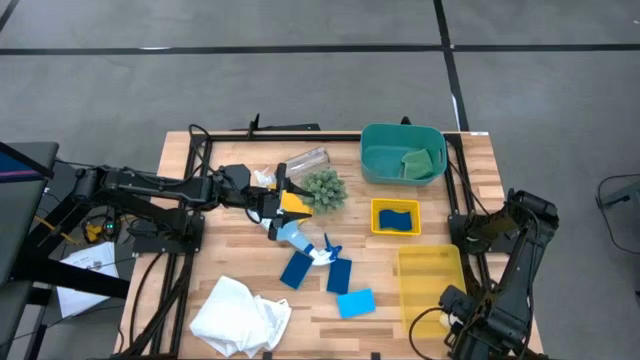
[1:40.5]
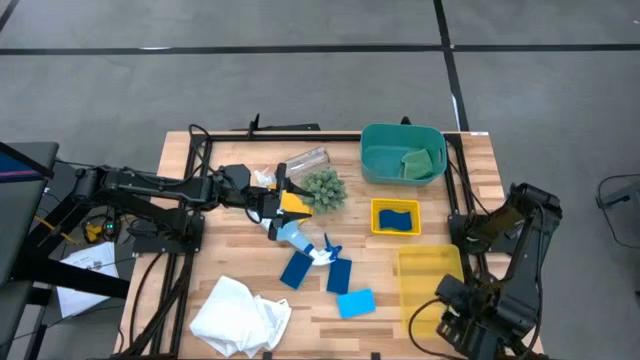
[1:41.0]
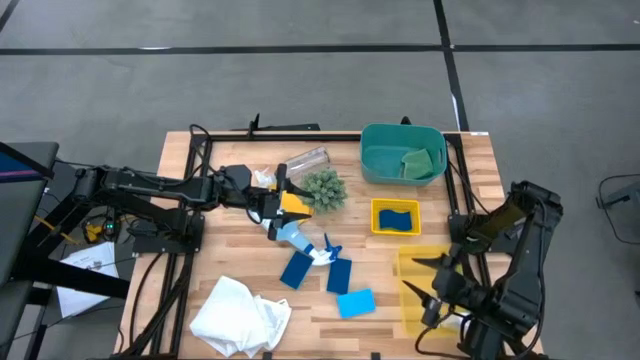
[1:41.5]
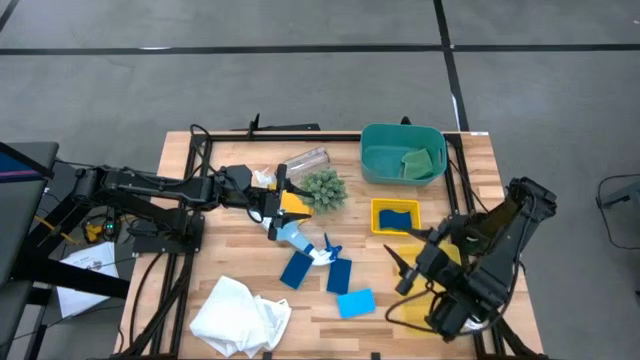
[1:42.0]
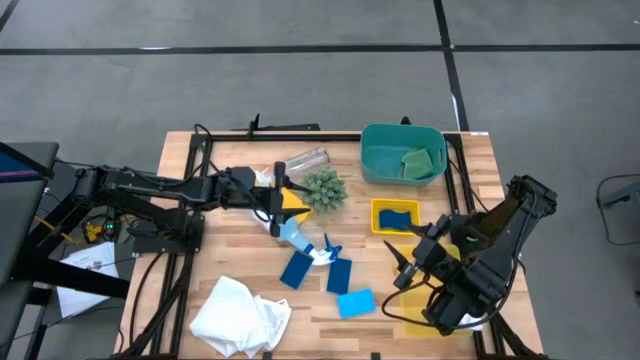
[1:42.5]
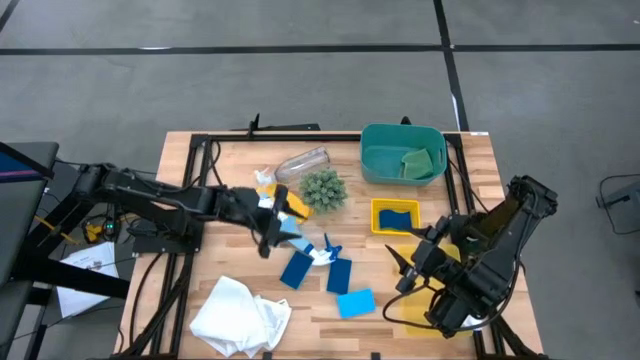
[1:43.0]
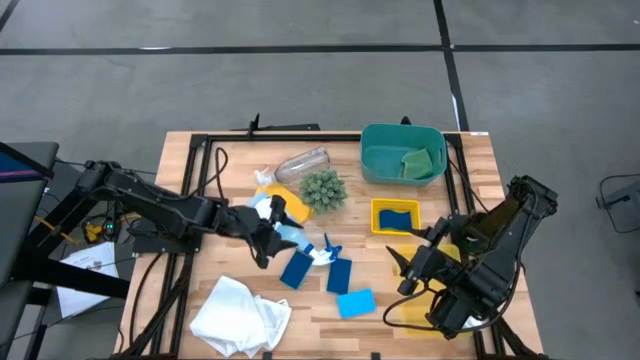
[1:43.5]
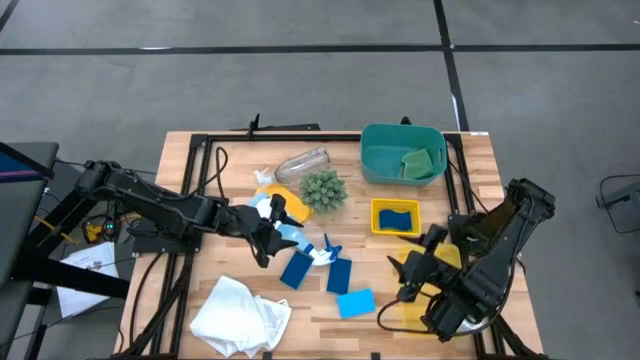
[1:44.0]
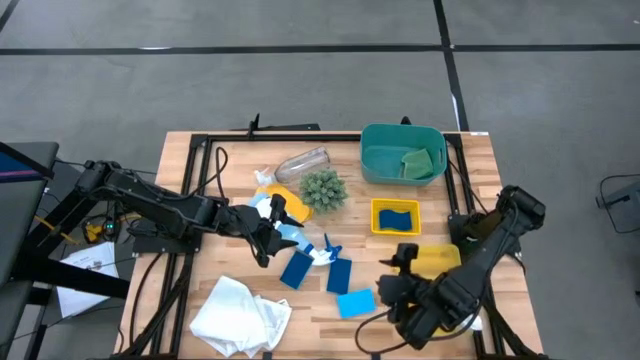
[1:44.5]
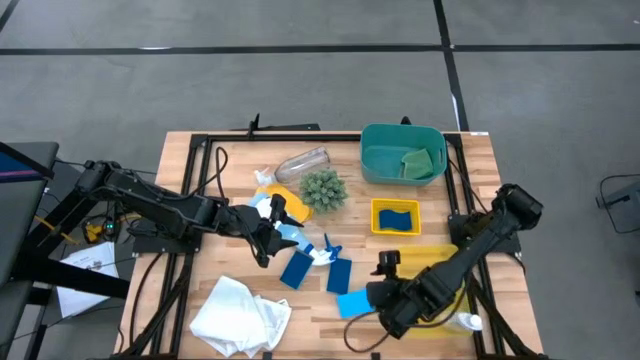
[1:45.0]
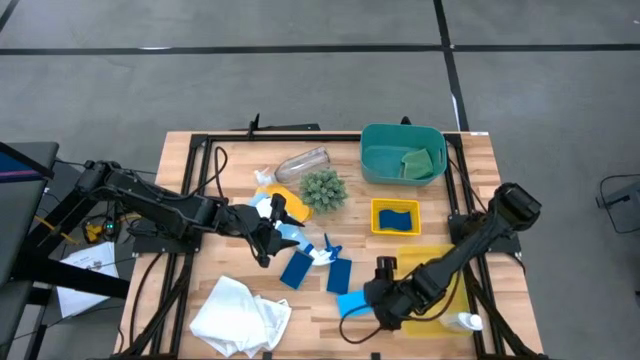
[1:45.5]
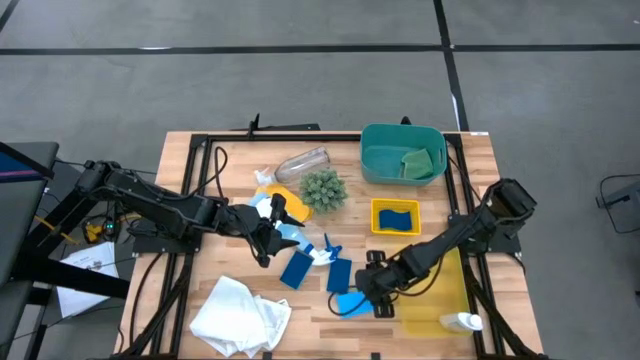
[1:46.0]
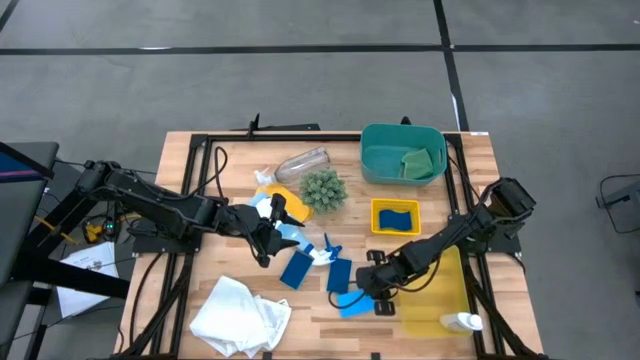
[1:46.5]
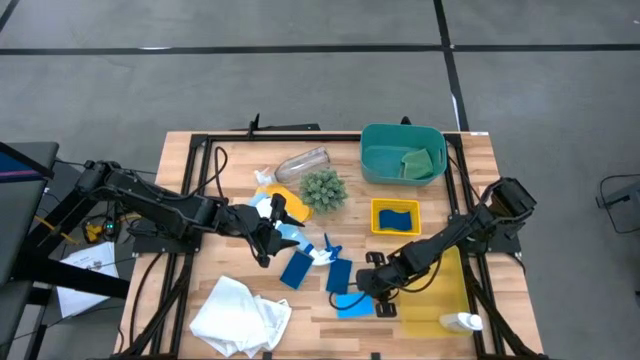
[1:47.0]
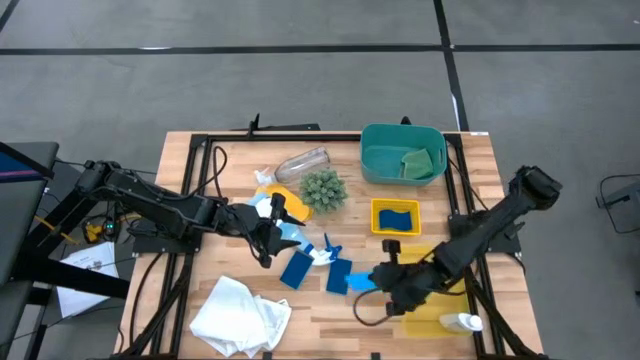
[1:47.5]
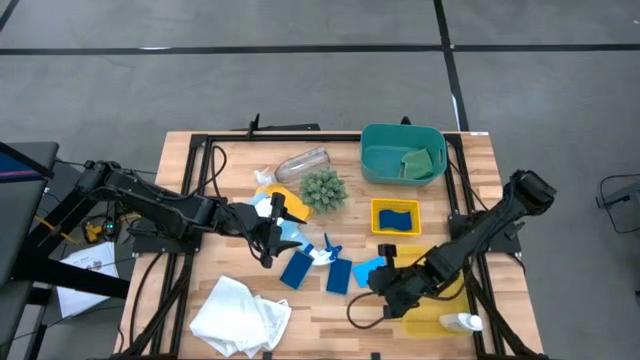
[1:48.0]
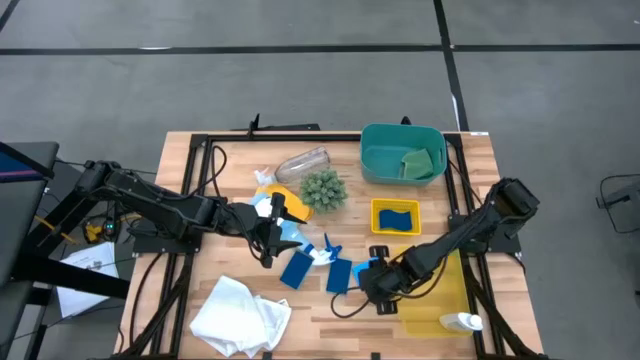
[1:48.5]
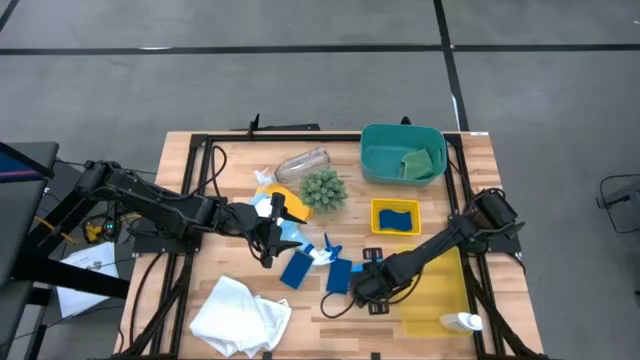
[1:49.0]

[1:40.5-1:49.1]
Task: Pick & Place Kitchen Items
Put the blue sponge into the top yellow bin

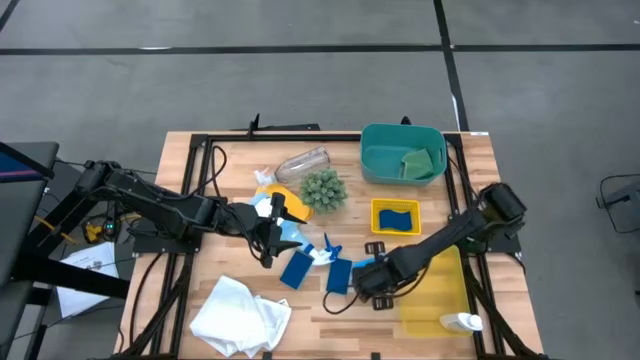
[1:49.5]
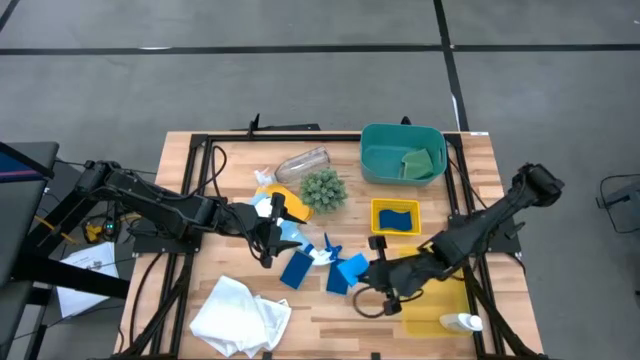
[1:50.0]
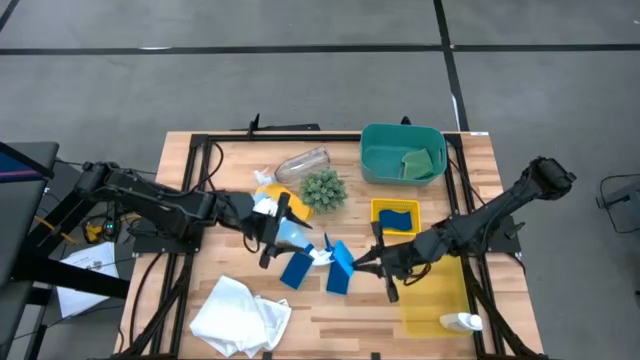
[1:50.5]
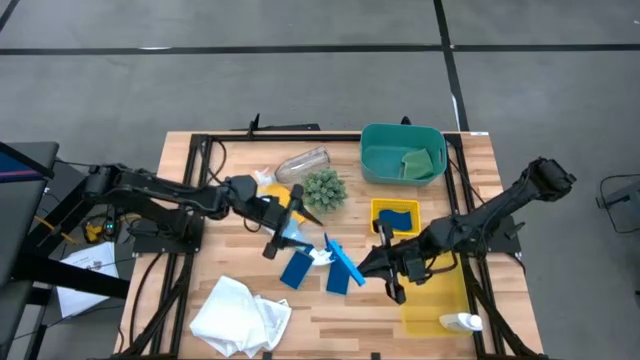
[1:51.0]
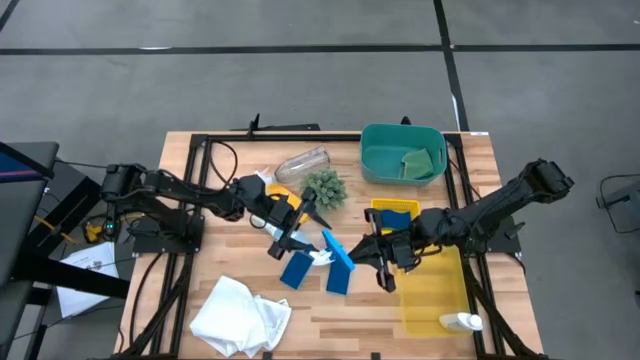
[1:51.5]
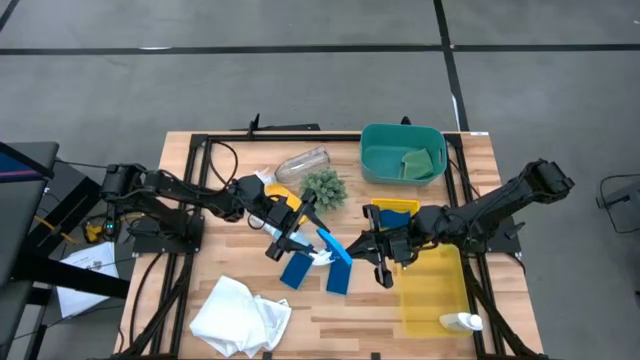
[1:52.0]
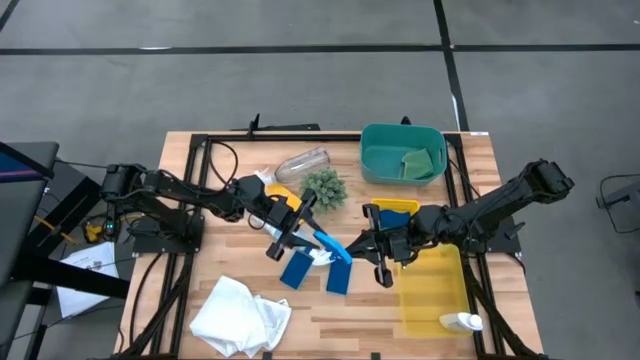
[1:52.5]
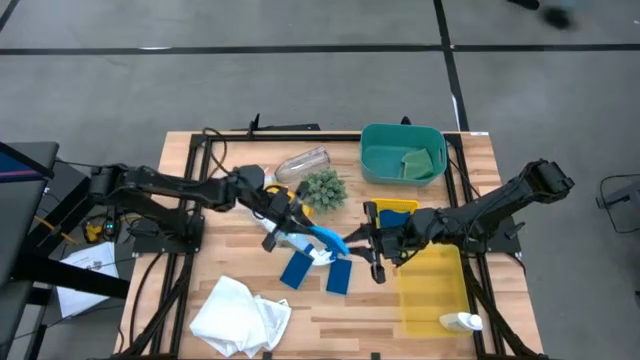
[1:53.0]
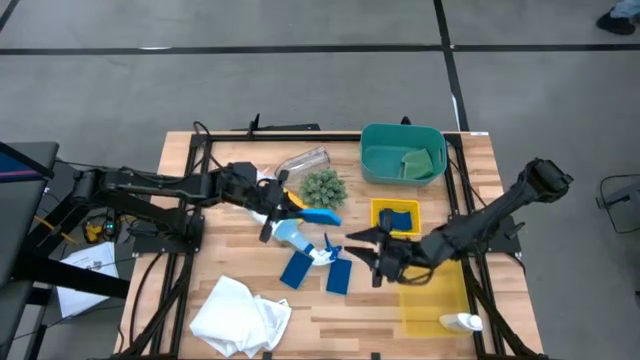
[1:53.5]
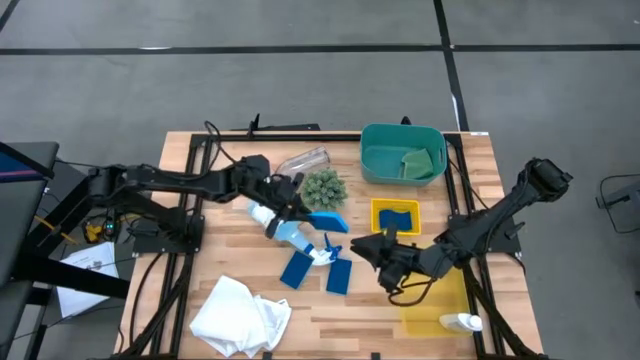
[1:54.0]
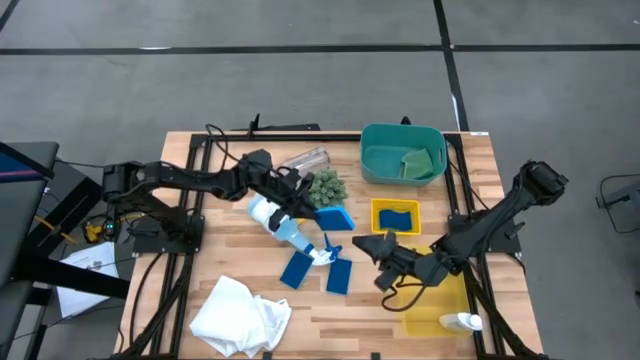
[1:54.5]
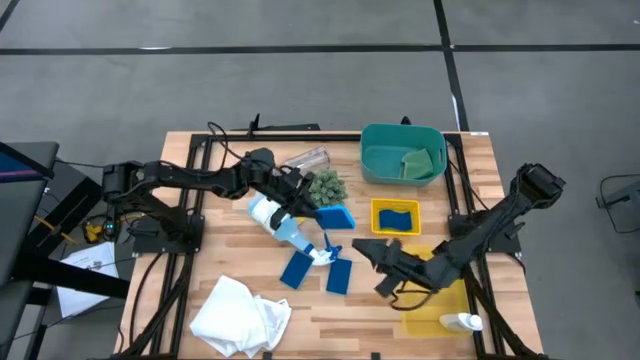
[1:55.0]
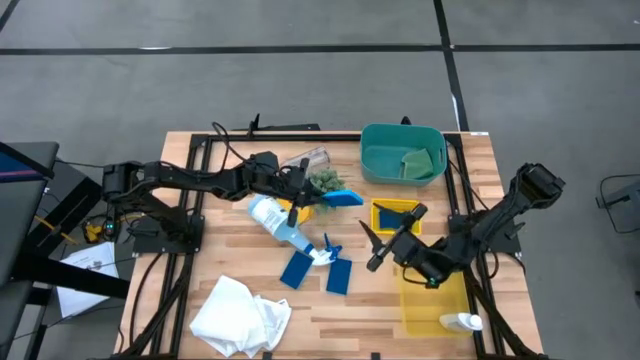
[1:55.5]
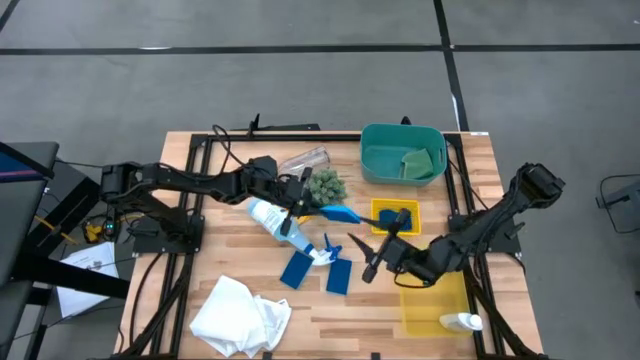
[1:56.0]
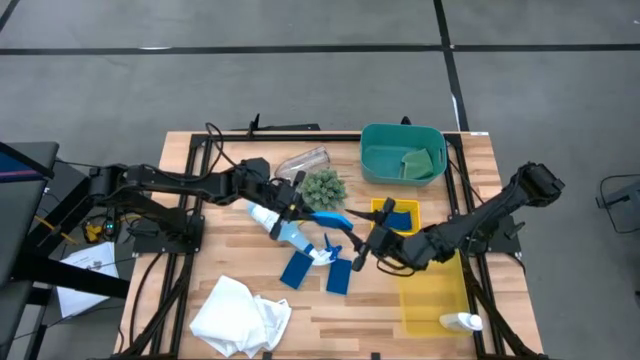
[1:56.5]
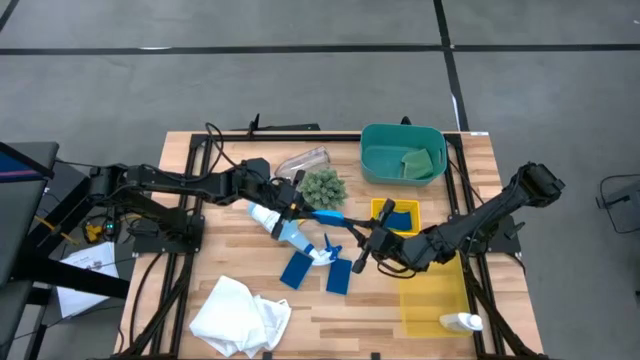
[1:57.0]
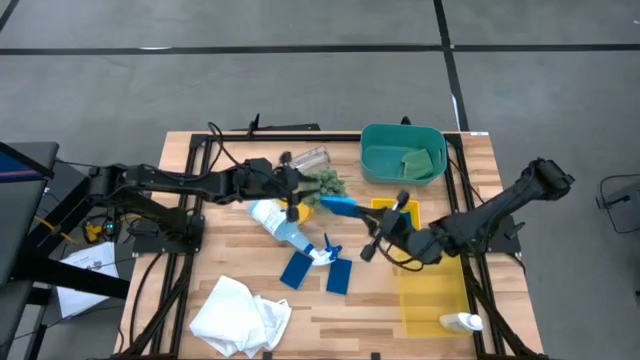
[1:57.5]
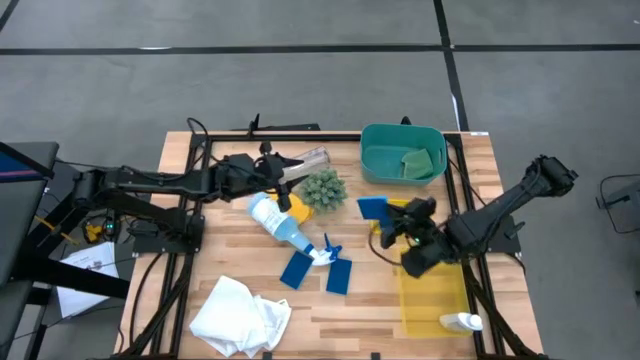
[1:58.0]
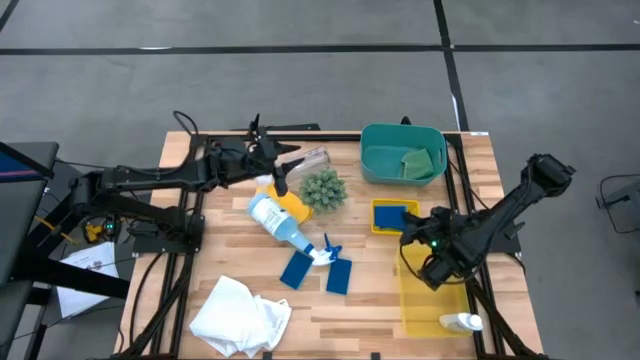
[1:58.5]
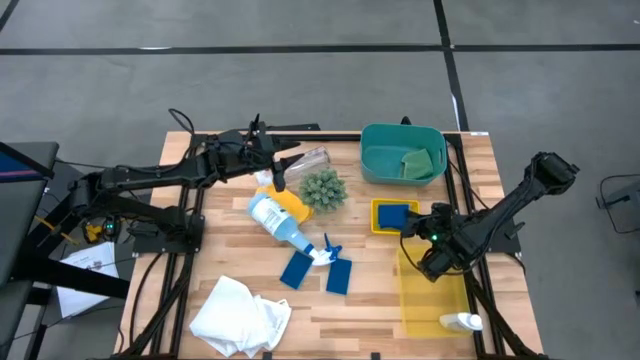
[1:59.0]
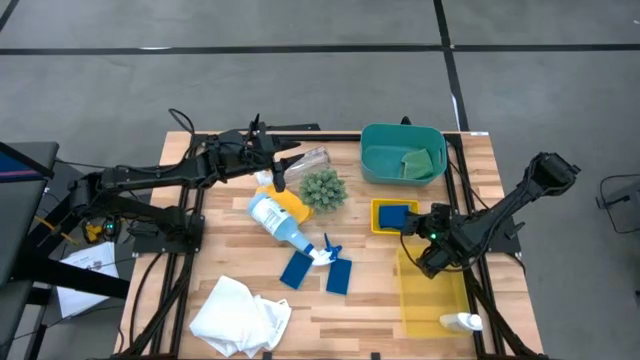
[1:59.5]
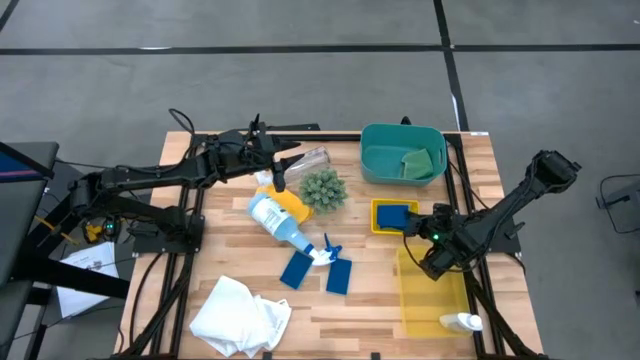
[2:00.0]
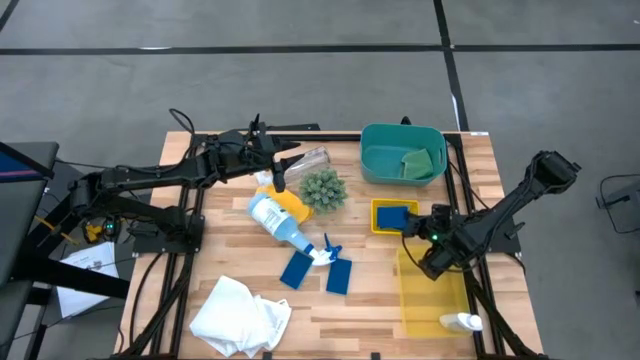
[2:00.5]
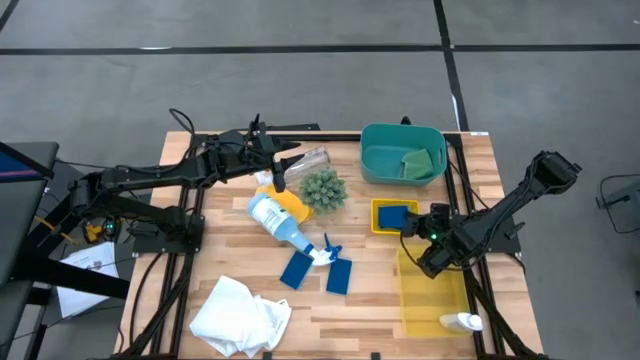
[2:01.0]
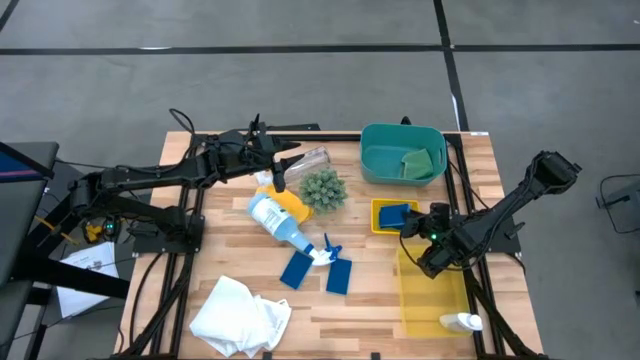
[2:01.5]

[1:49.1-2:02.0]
Put the blue sponge into the top yellow bin
